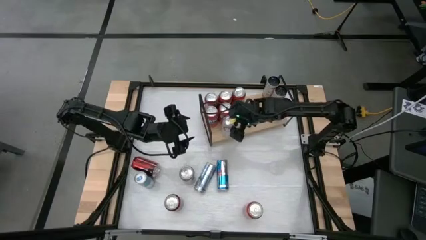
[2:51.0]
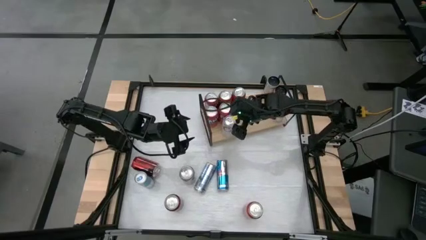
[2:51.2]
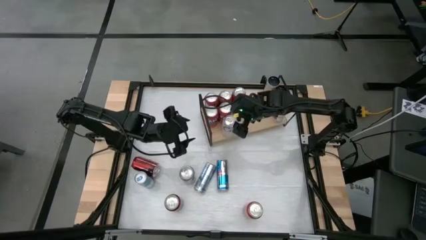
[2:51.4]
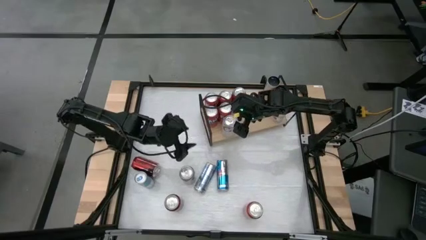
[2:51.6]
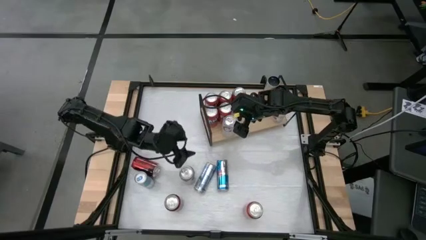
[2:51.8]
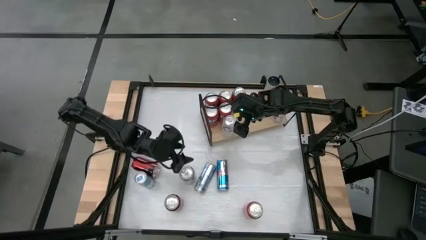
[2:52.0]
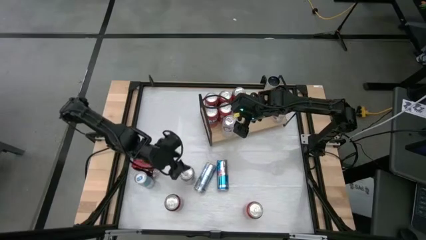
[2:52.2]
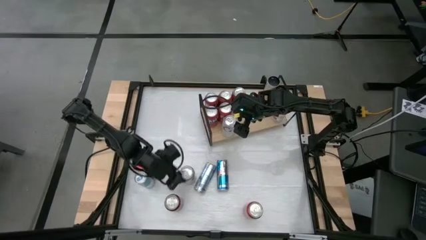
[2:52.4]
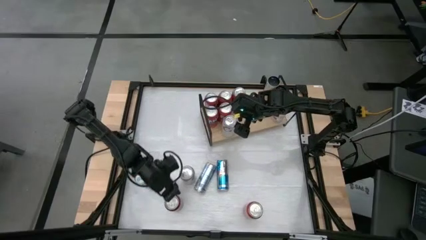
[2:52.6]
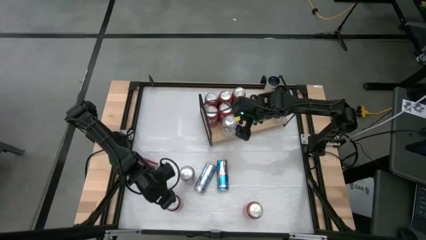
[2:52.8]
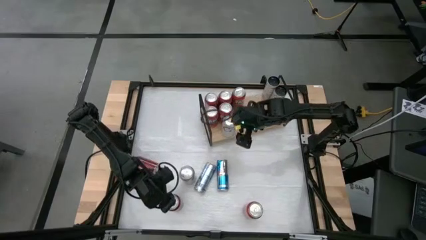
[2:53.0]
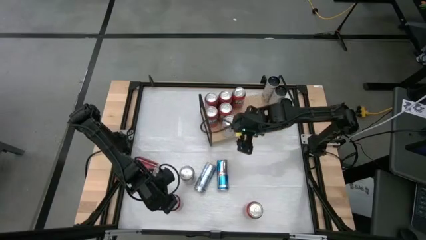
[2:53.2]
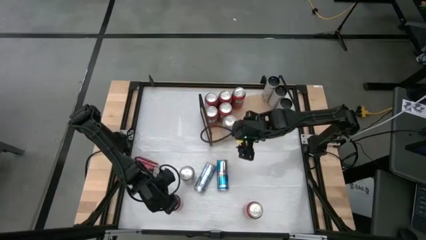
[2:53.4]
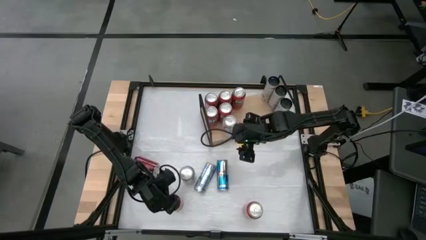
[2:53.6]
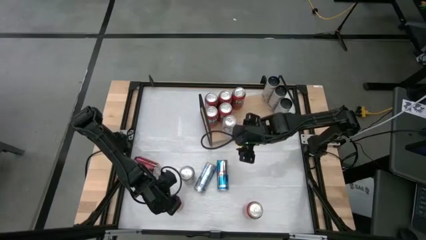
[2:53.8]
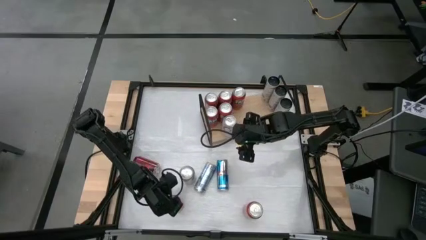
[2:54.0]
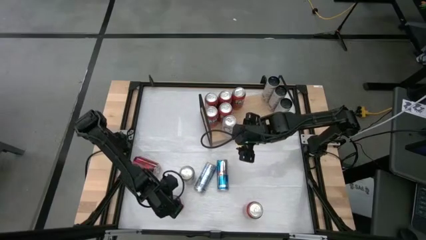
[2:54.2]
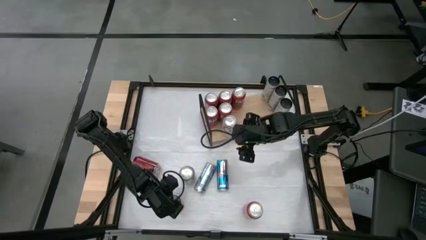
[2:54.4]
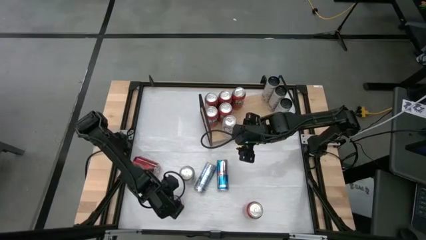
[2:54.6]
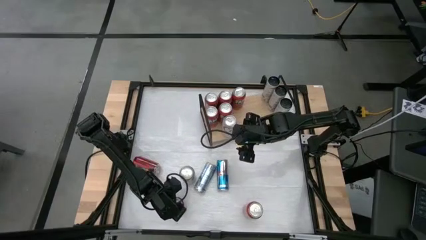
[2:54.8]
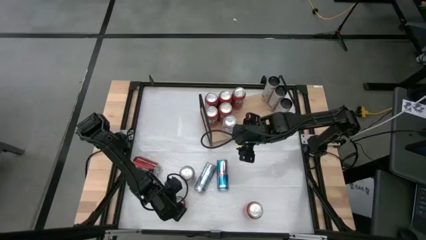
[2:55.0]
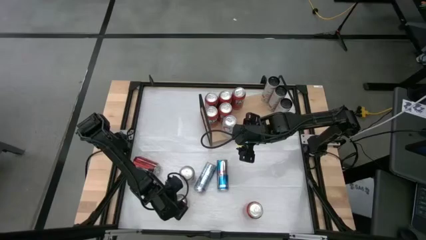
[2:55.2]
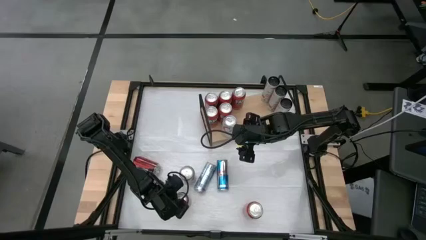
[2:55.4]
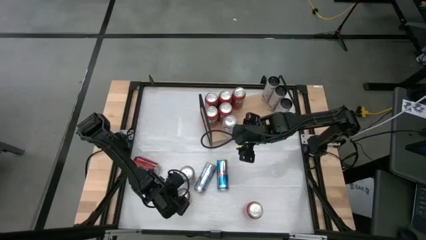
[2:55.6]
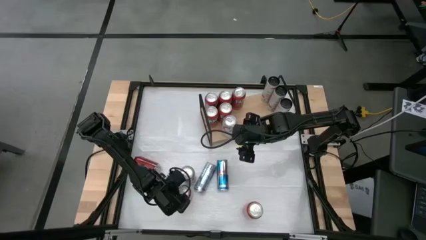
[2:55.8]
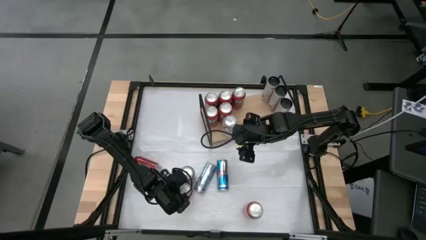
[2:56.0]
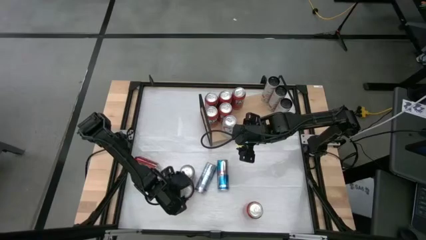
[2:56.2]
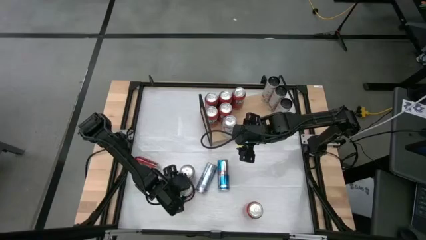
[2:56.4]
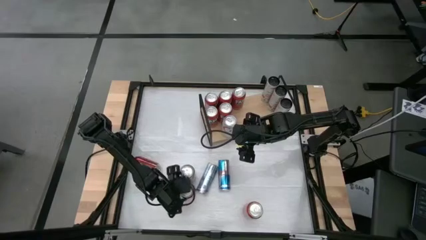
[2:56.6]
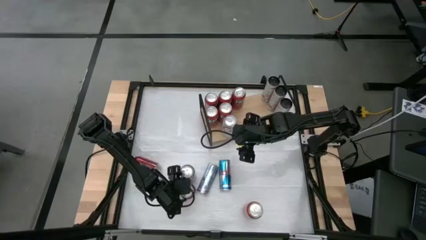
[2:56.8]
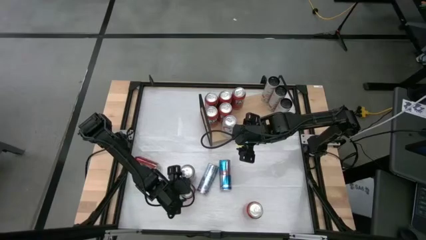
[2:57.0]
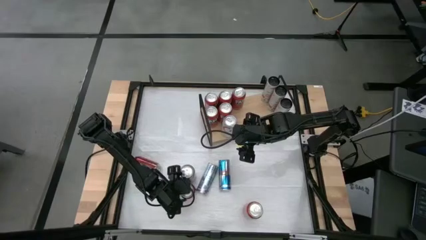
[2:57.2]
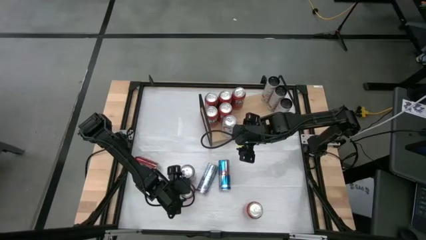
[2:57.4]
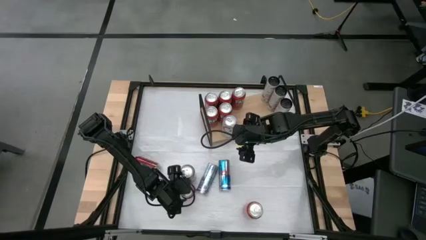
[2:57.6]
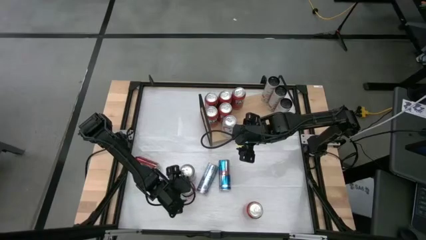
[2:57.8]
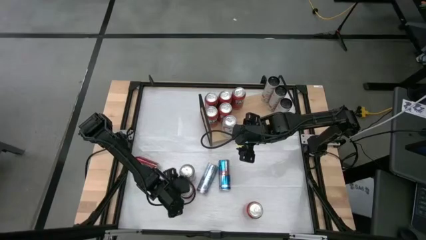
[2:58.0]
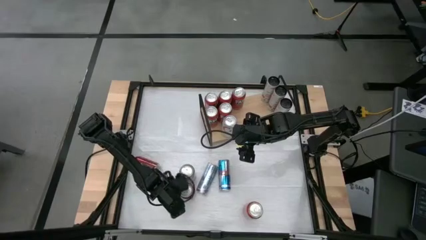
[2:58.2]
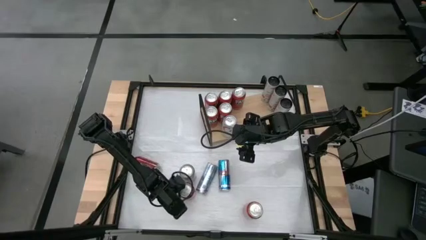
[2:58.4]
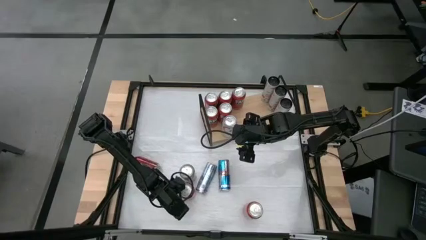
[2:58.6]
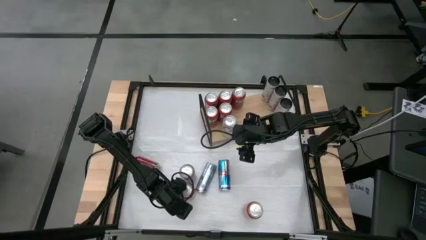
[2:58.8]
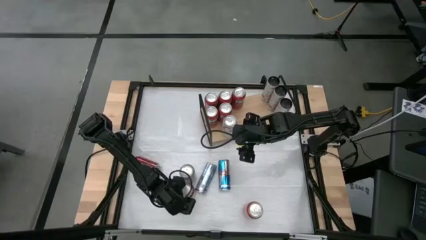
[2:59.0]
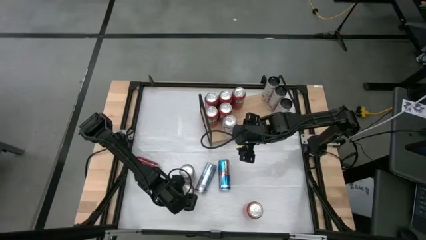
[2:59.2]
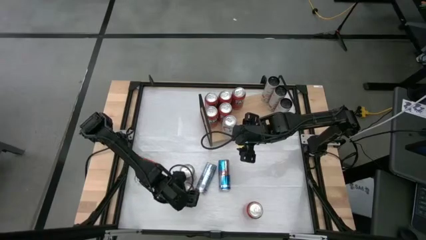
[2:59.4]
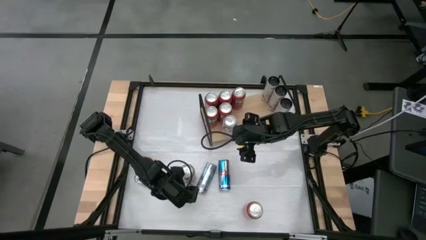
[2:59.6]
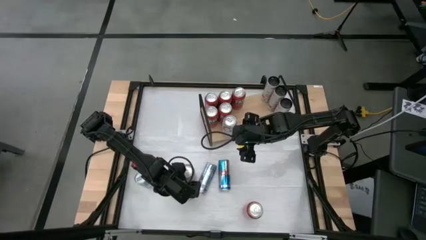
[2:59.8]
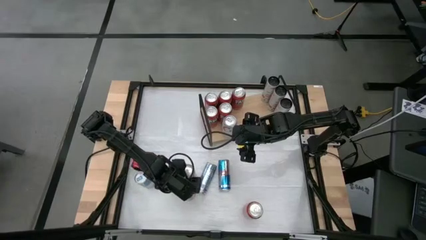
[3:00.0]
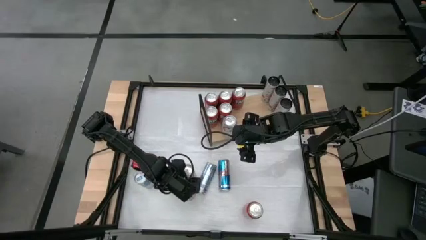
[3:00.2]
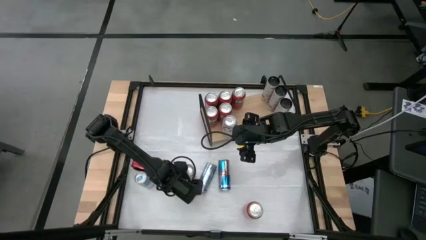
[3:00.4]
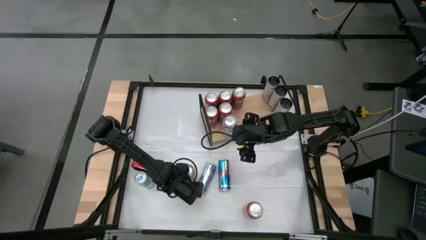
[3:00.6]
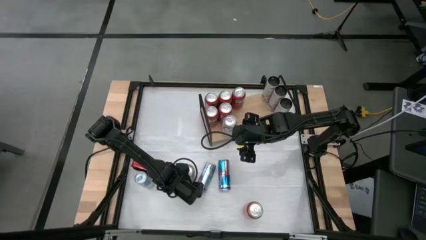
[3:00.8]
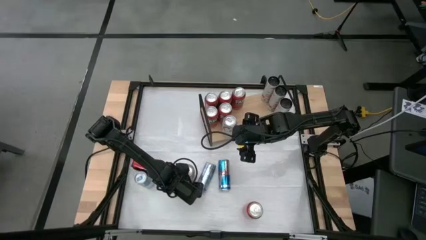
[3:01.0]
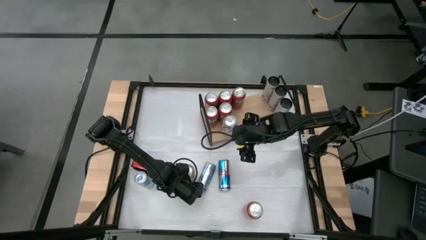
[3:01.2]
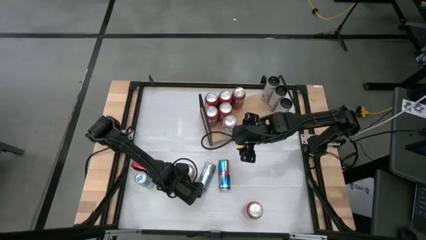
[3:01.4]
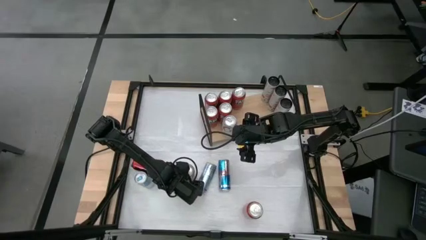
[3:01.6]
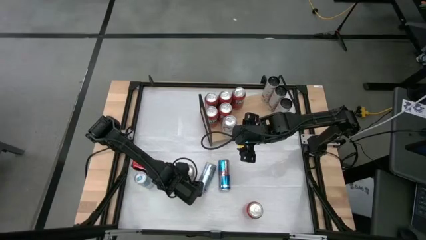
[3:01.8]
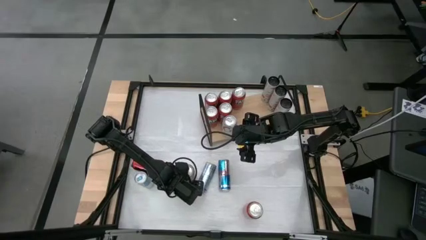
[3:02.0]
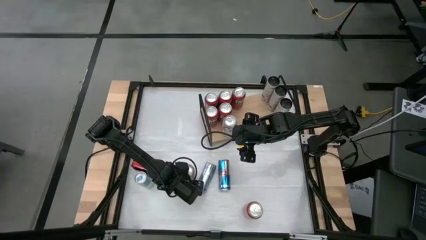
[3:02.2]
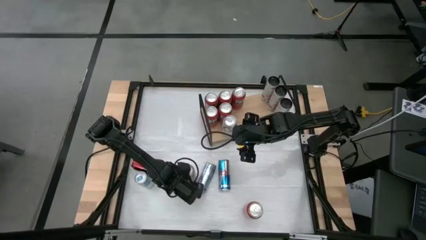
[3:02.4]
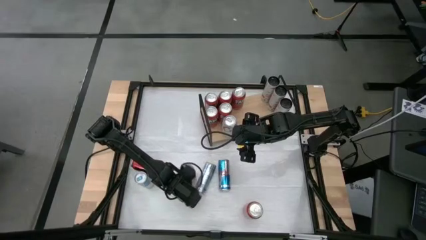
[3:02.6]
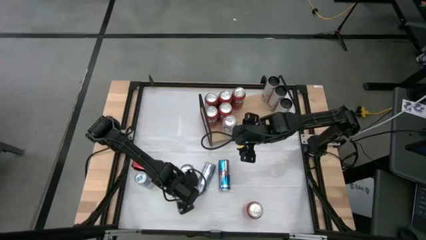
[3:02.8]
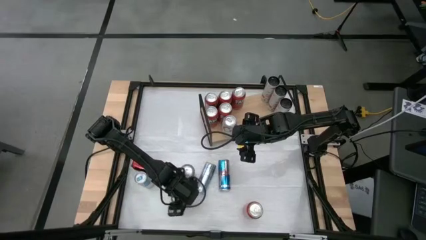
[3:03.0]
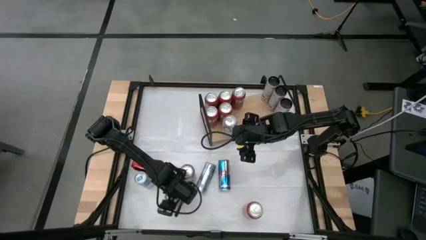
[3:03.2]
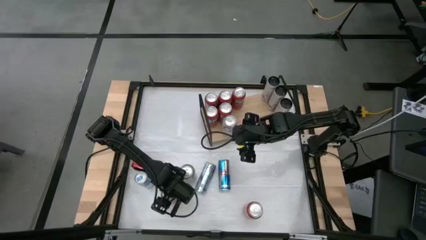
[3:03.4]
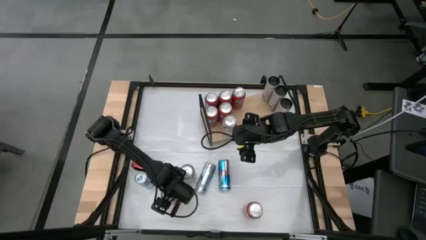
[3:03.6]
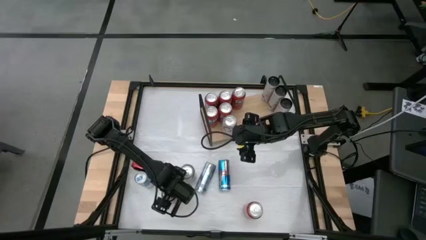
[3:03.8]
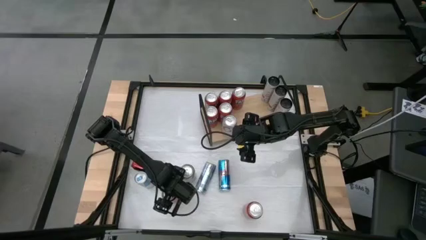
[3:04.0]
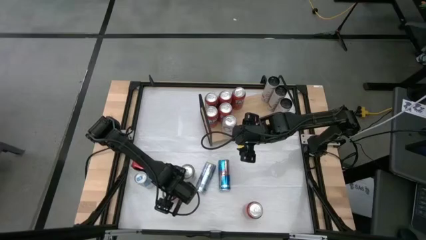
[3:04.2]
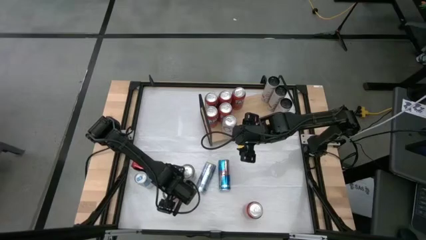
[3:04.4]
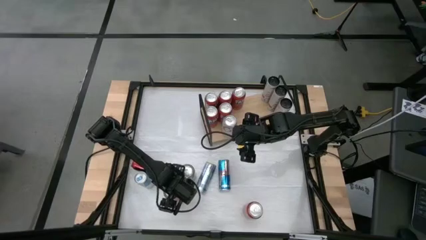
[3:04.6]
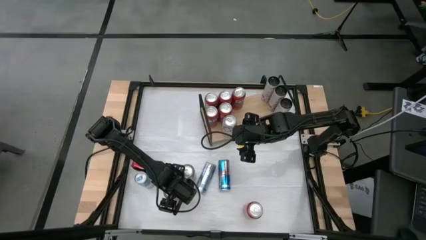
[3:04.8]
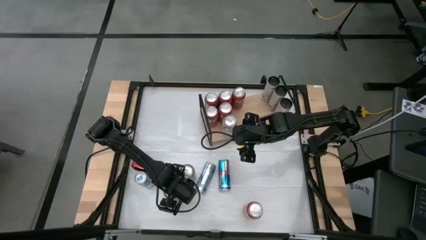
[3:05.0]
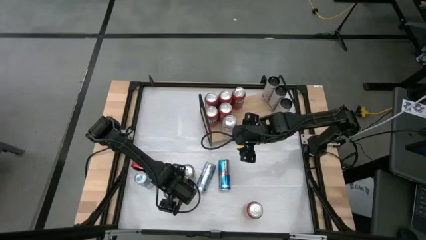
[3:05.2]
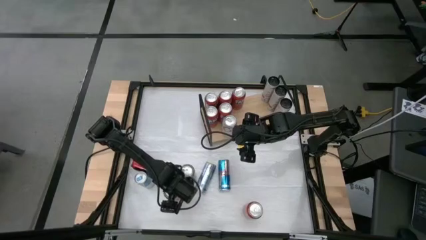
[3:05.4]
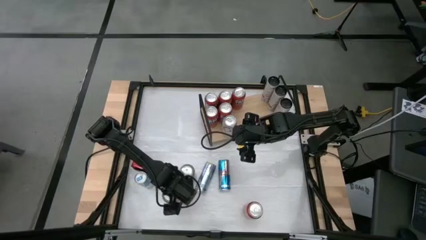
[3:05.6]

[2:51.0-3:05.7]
Task: Place canned beverage on shelf
Put the center red soda can on the shelf
